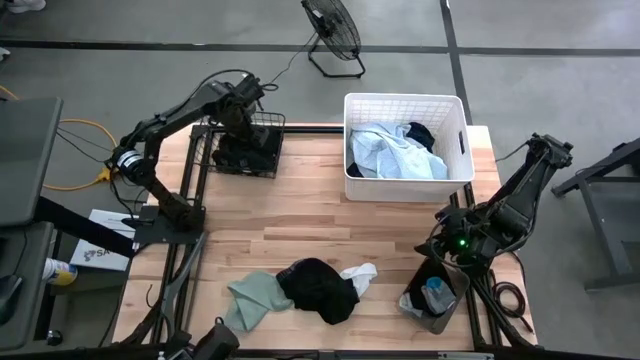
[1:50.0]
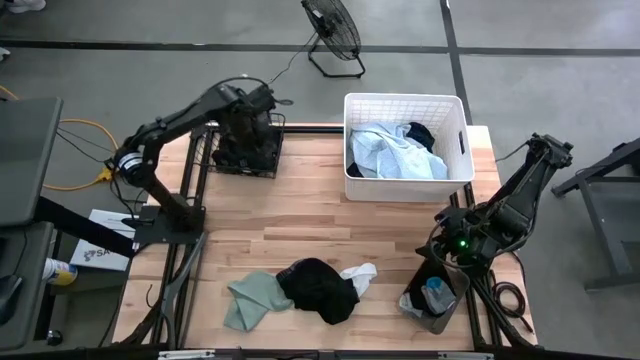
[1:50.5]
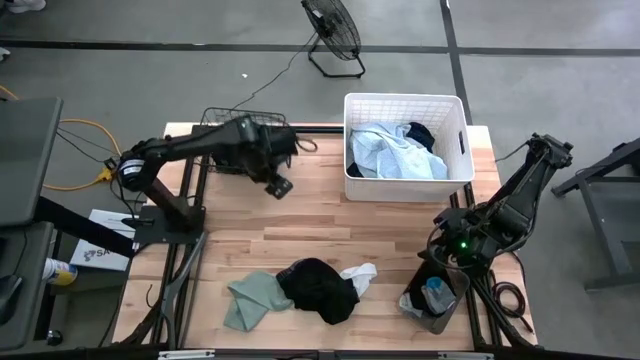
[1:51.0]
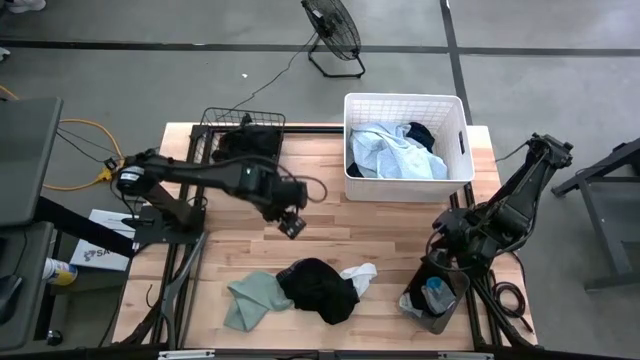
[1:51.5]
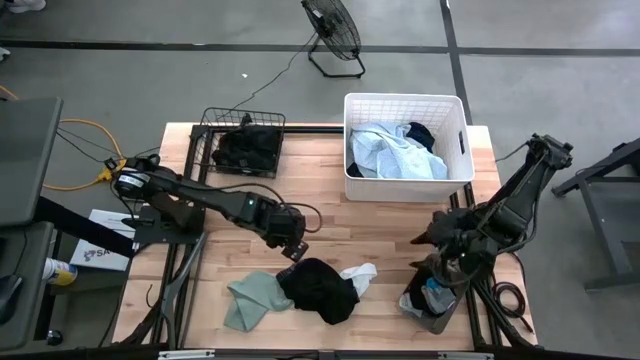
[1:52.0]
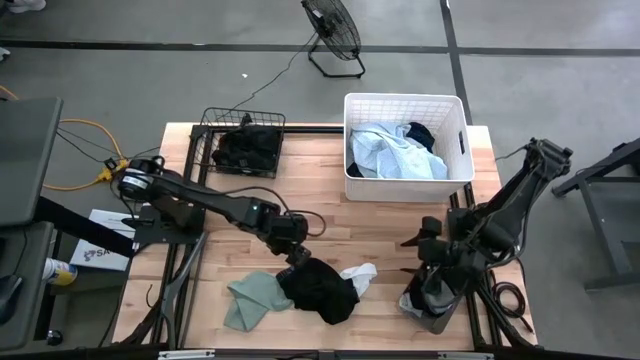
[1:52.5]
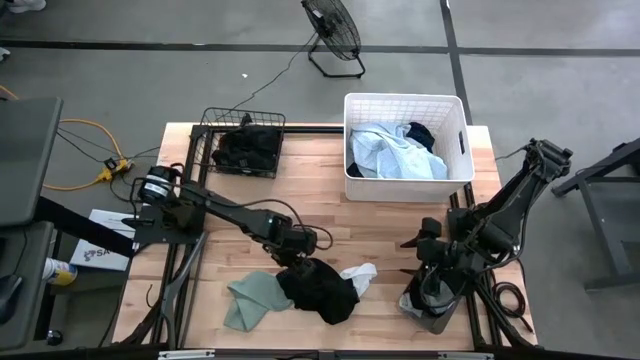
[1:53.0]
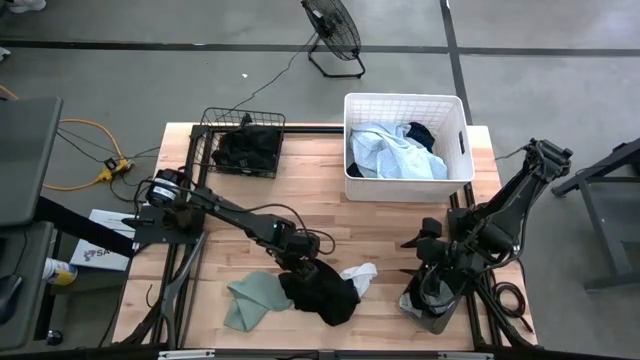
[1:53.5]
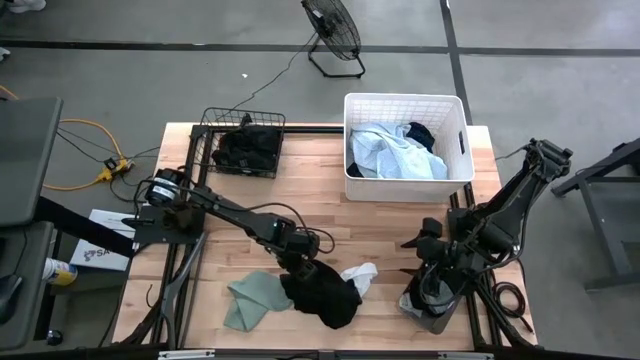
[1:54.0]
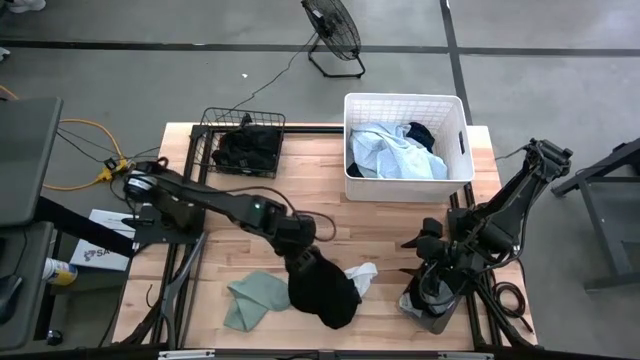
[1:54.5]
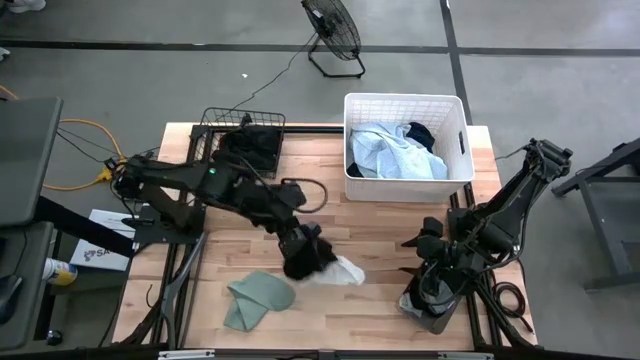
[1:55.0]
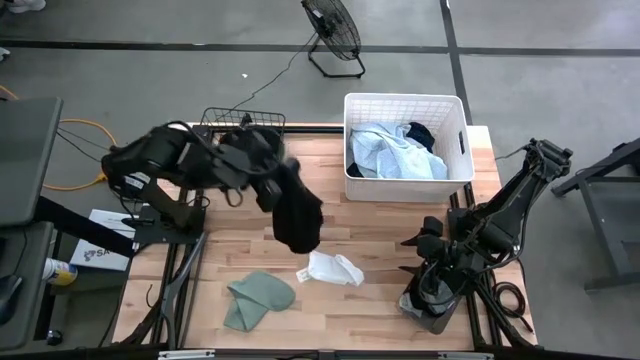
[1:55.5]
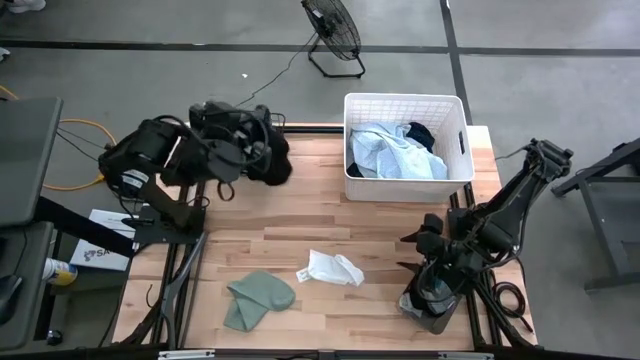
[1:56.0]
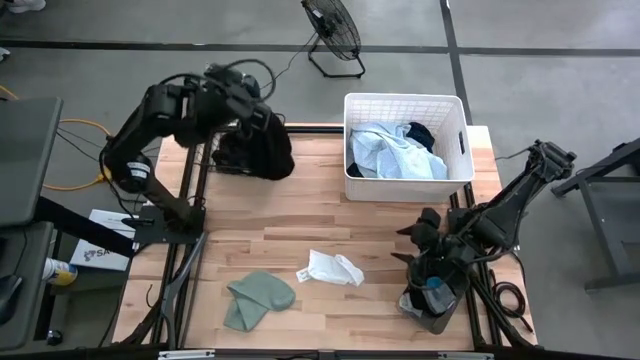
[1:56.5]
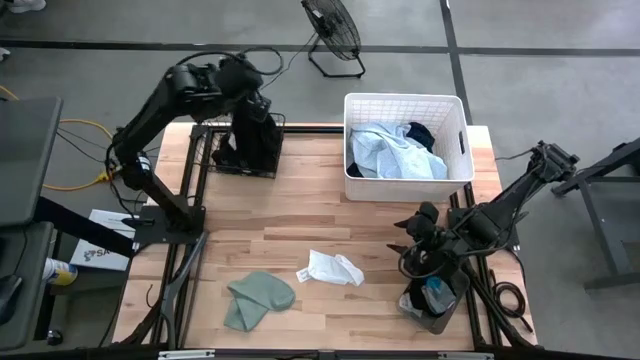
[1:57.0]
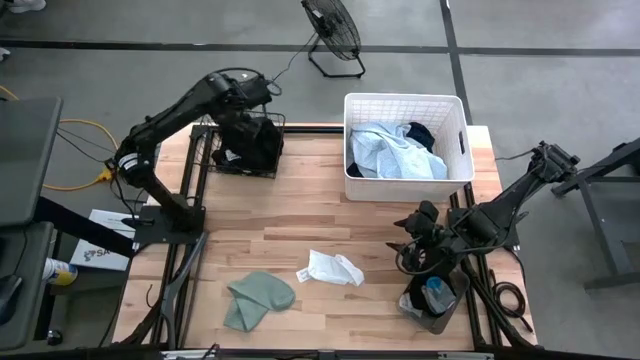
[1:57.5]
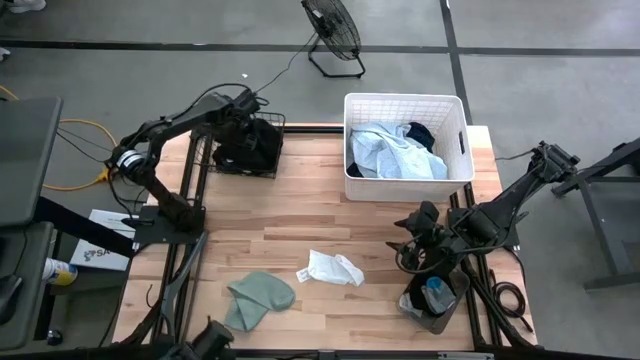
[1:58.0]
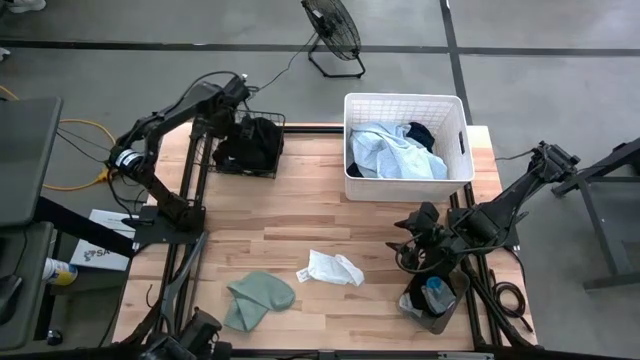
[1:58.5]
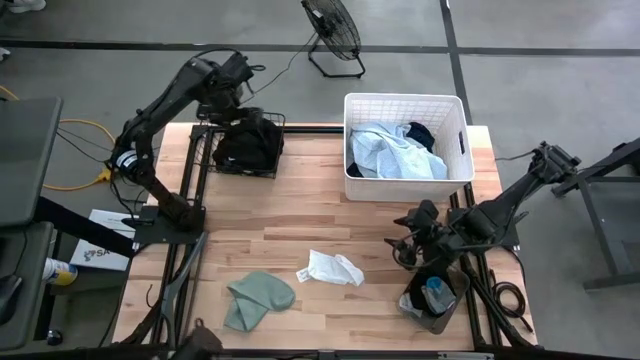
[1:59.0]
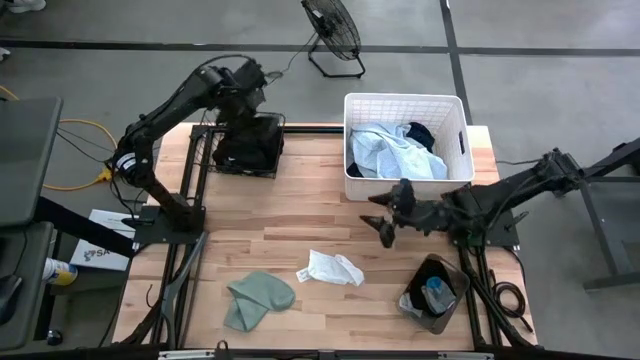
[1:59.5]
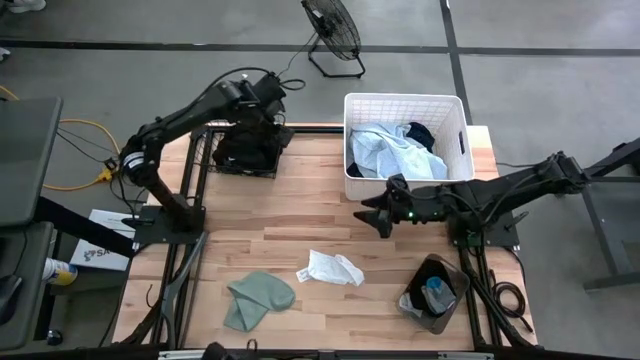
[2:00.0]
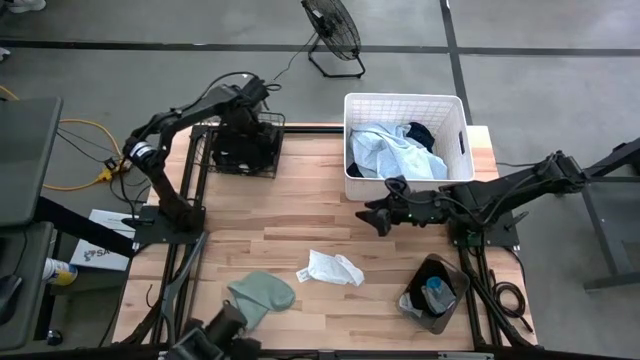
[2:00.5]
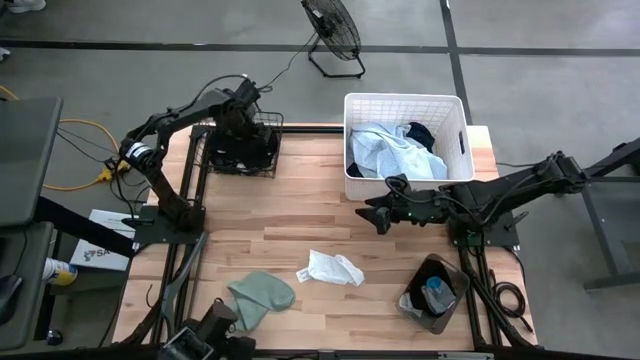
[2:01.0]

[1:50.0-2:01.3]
Task: Pick & Place Cloths
Put the black boxer shorts into the black wire basket

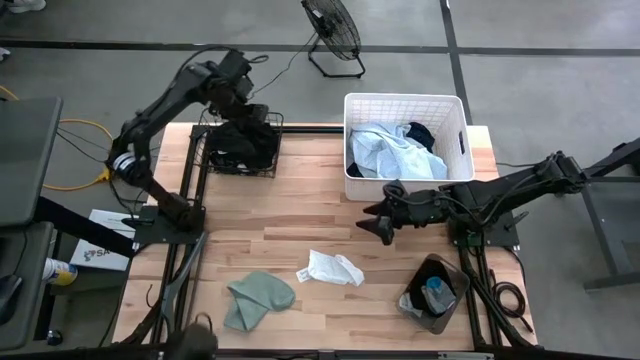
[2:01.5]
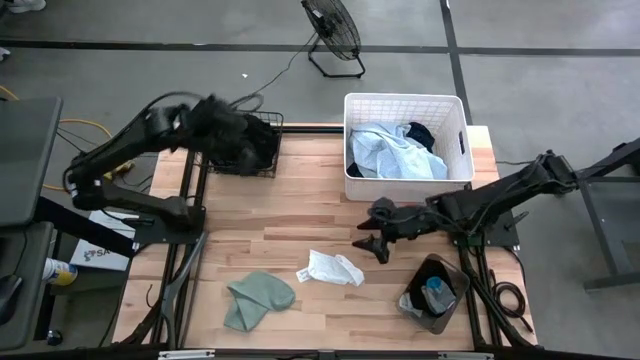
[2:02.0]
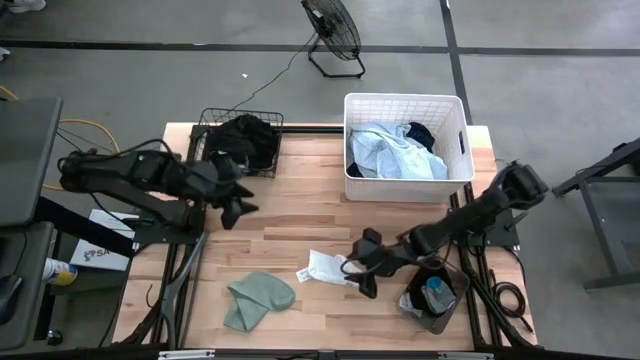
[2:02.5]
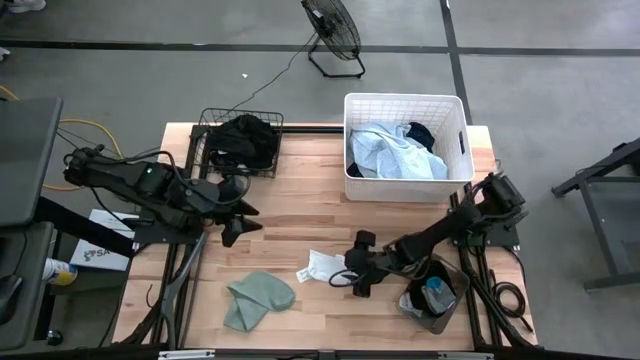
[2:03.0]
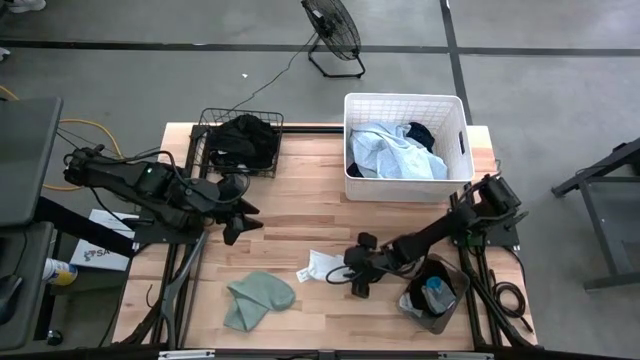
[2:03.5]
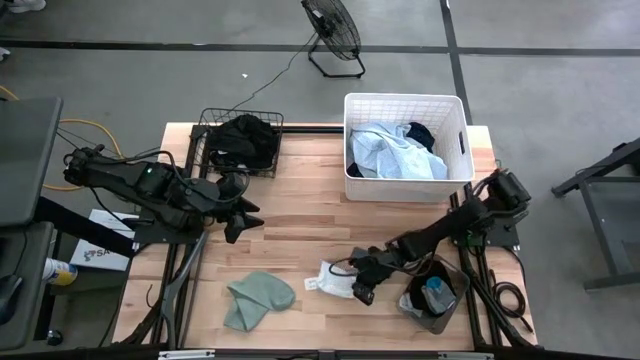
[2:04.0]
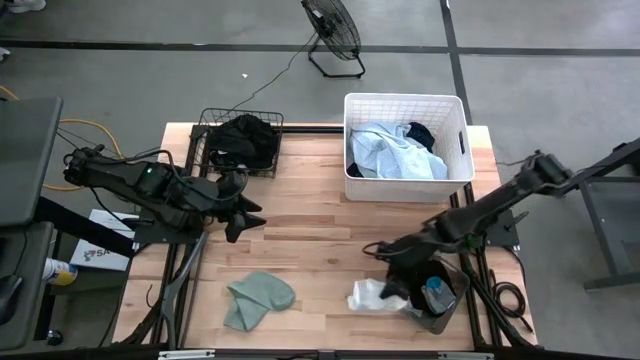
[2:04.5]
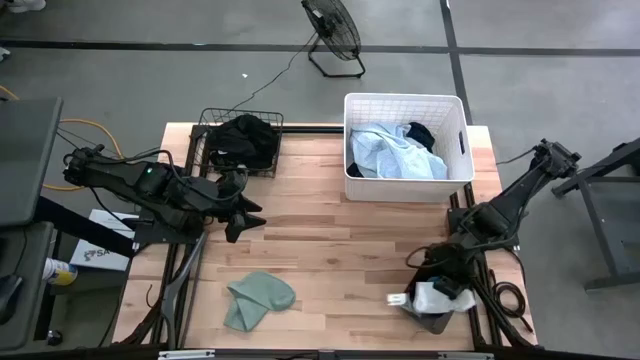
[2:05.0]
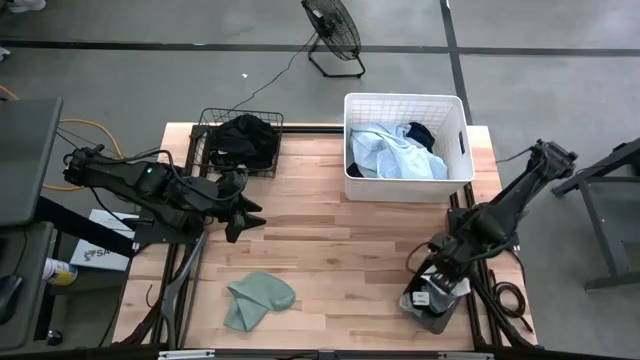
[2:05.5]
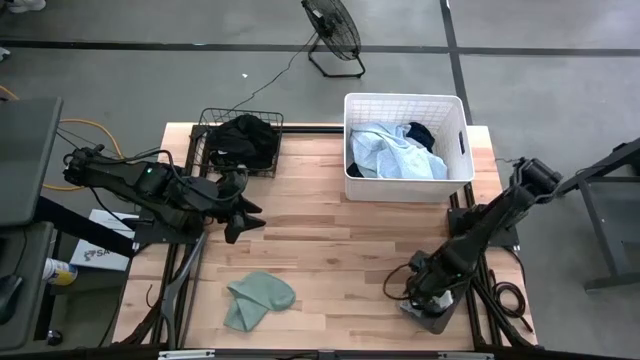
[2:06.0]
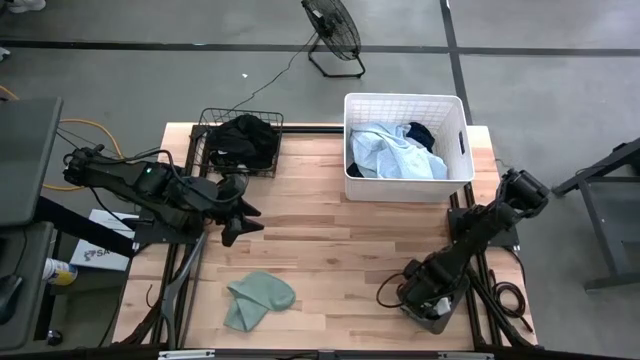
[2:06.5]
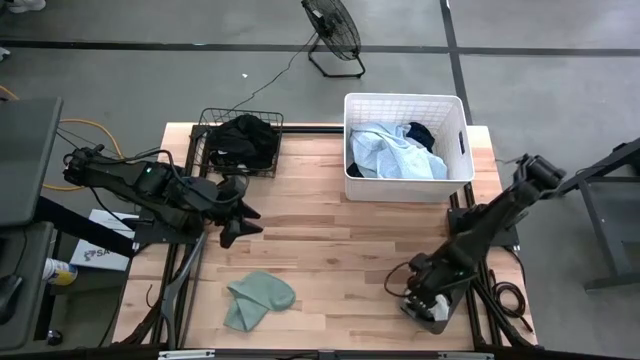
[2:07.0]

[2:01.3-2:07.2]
Put the white sock into the black bin

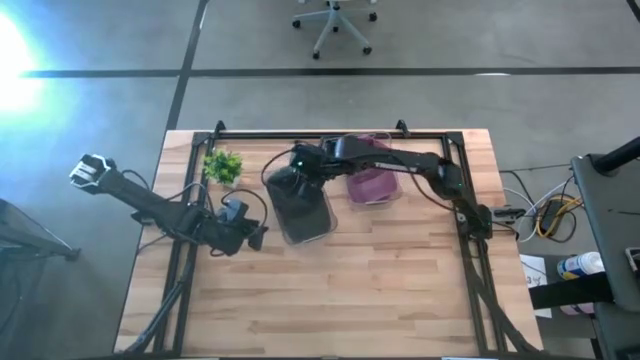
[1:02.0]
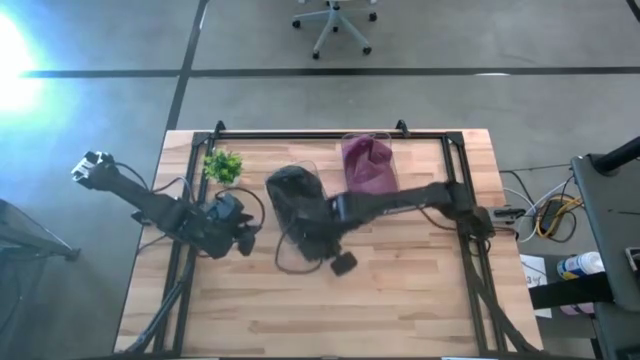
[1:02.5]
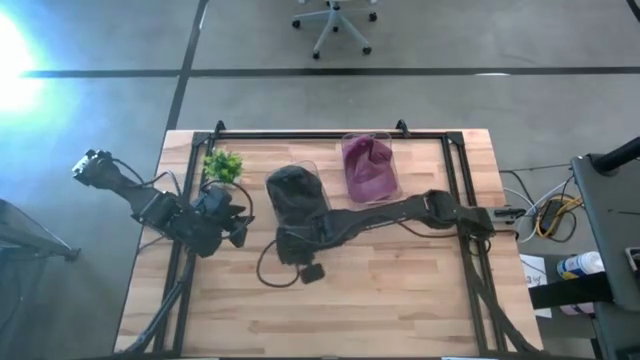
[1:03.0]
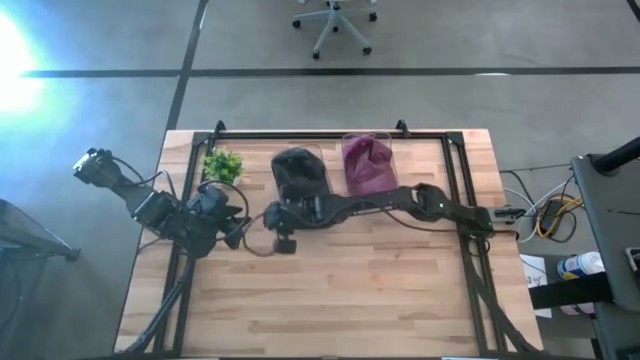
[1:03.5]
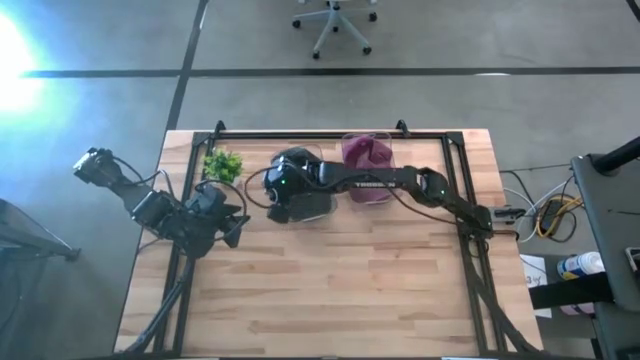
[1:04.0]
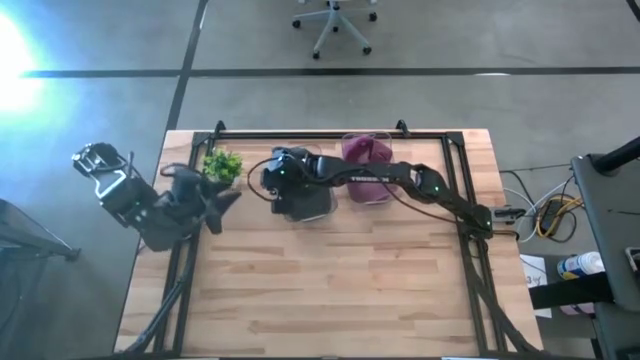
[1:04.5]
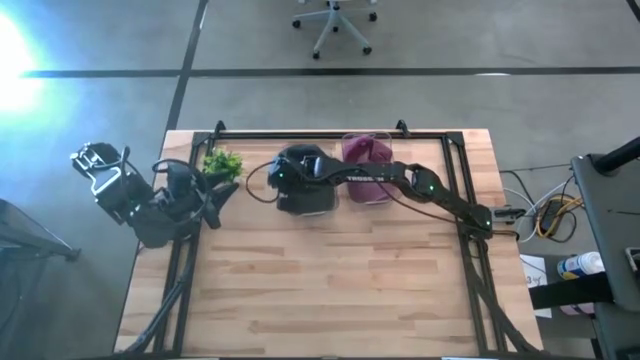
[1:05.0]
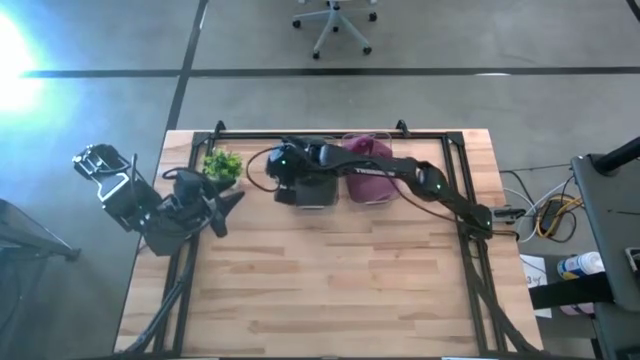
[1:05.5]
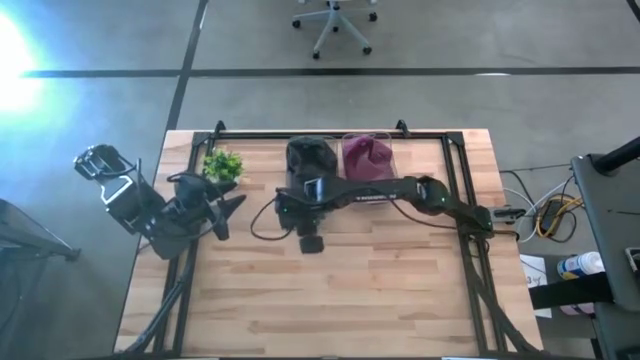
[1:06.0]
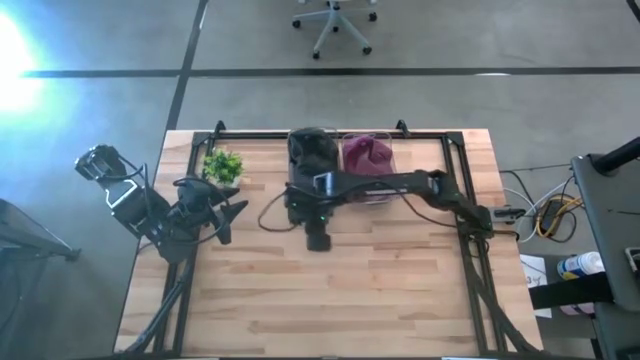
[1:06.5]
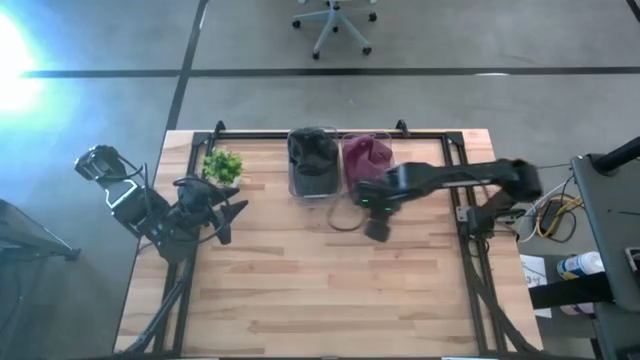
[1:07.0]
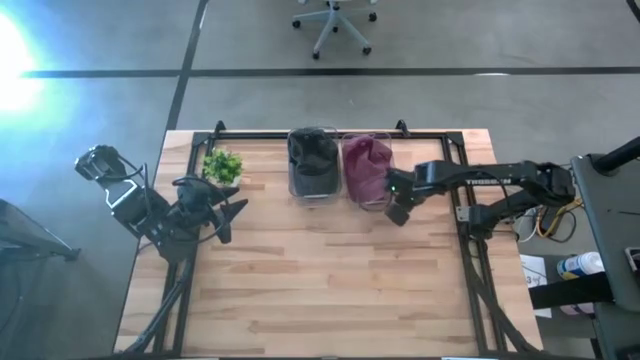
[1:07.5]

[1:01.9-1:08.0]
Task: Pick & Place hat
Adjust the transparent bins
